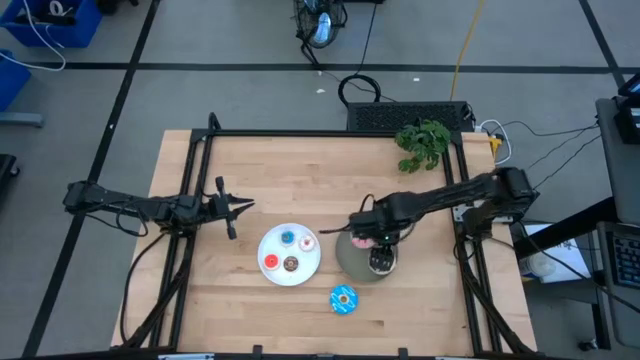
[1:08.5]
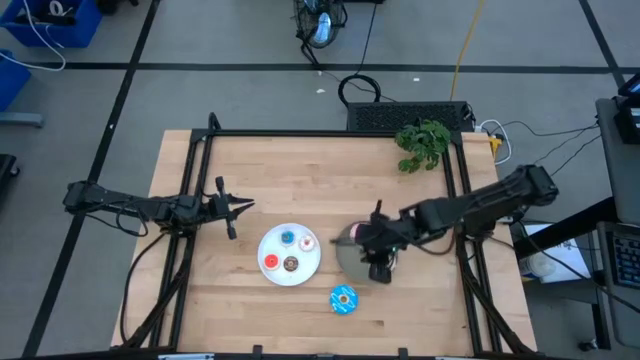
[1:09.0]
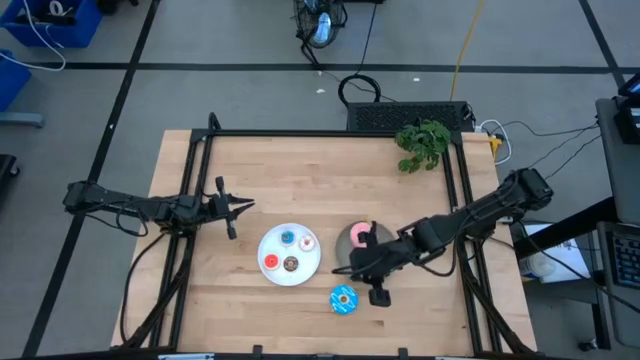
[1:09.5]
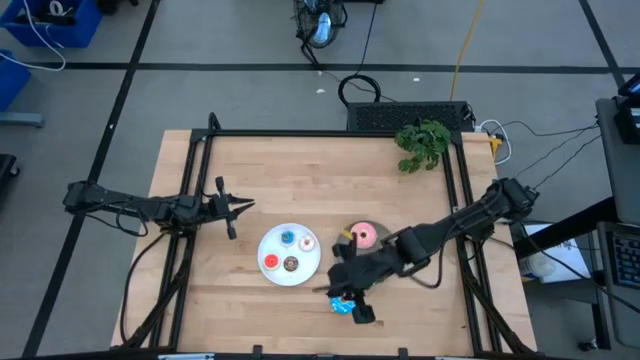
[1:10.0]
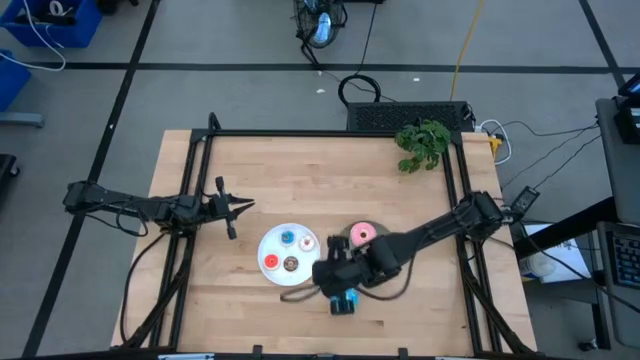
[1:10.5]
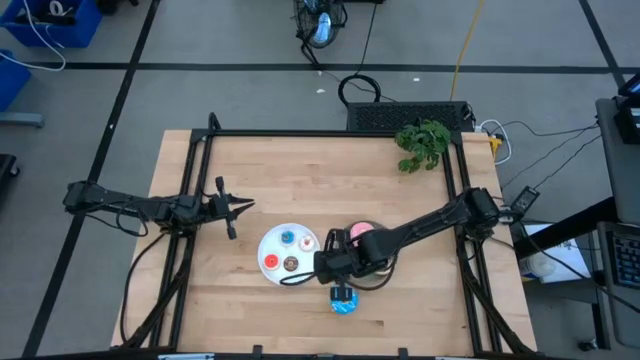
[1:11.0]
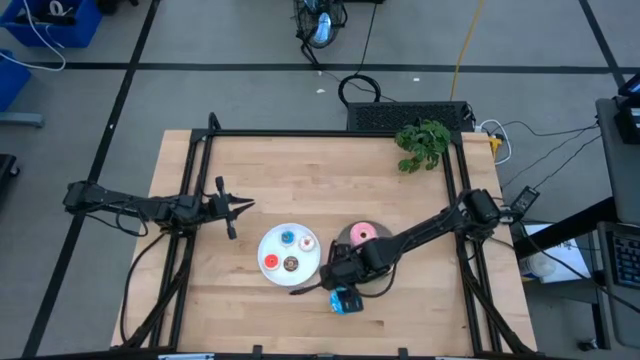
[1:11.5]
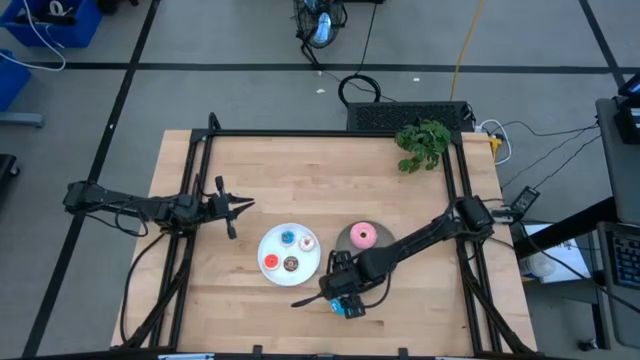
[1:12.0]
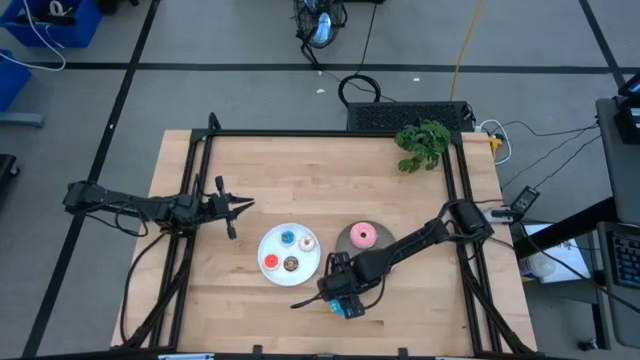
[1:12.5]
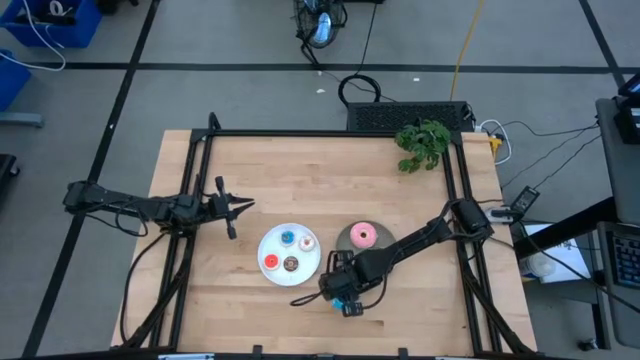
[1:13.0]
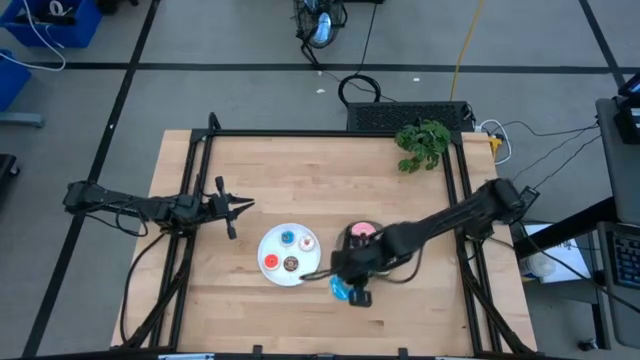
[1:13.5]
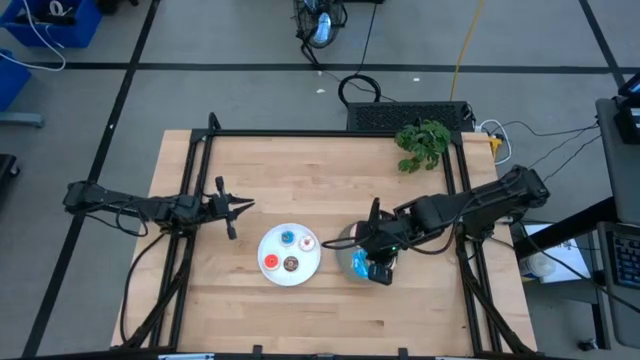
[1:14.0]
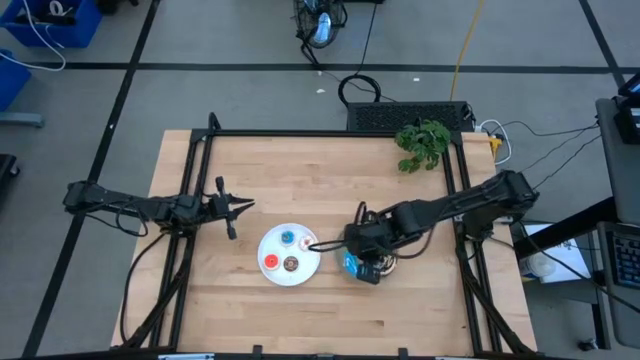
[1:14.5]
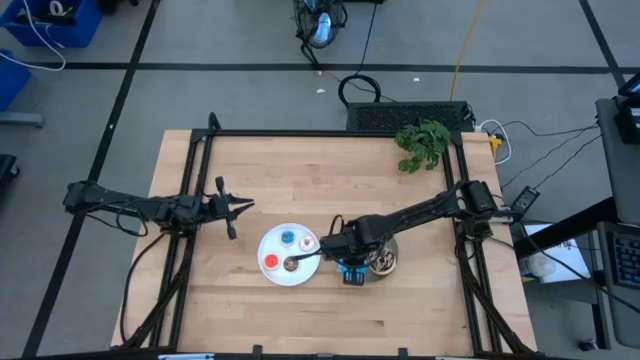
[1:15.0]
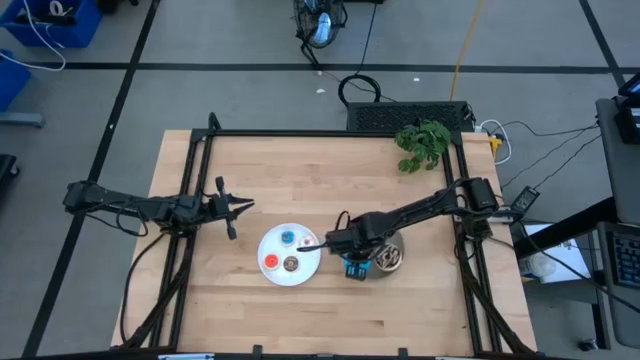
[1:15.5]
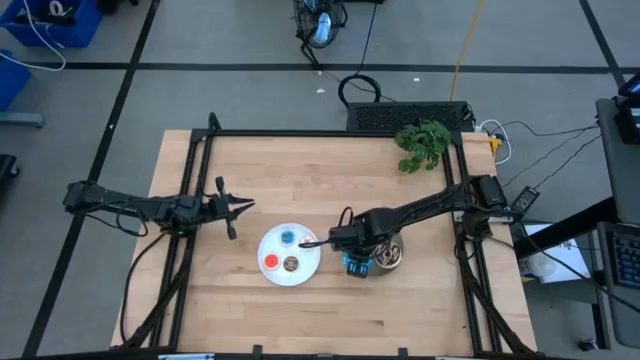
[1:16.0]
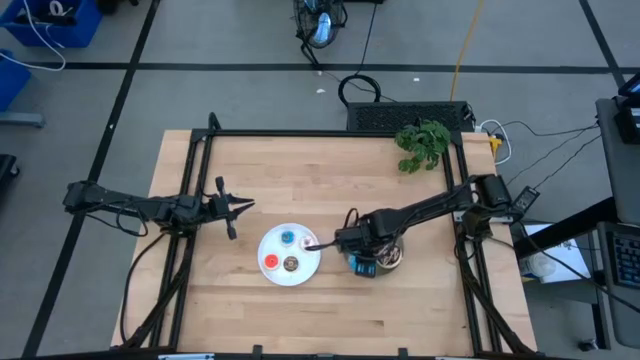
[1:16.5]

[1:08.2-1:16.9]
Task: Pick & Place donuts
Put the large blue donut on the gray plate

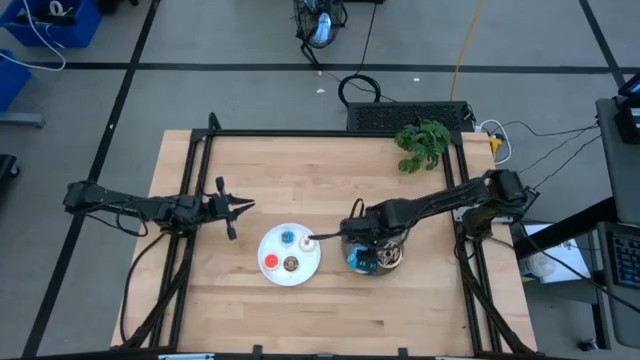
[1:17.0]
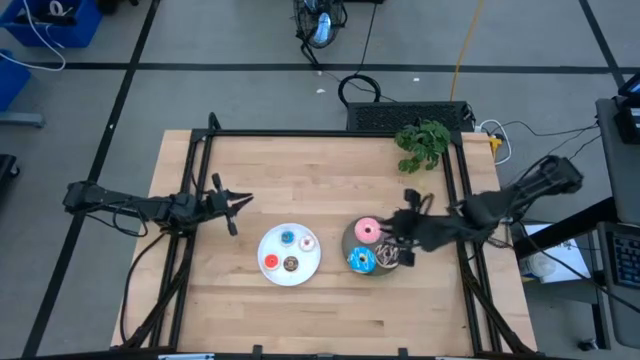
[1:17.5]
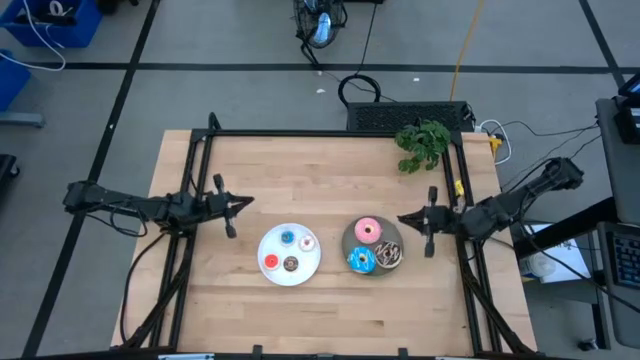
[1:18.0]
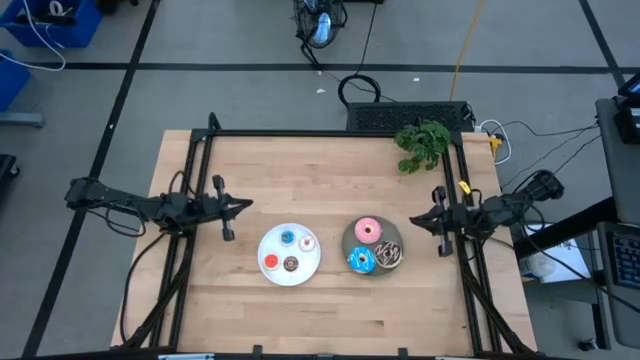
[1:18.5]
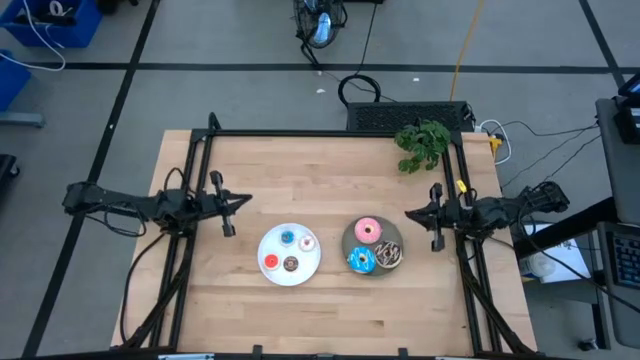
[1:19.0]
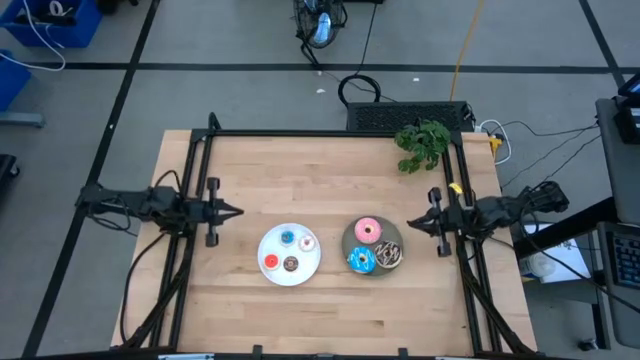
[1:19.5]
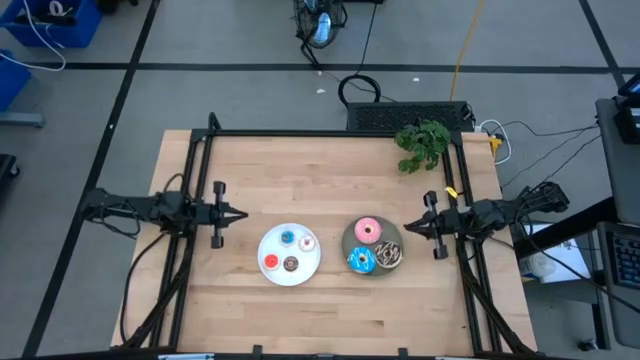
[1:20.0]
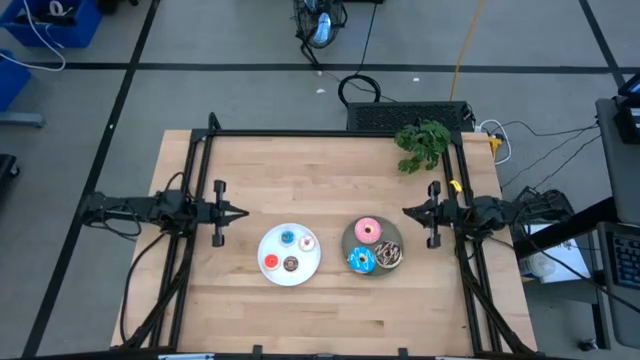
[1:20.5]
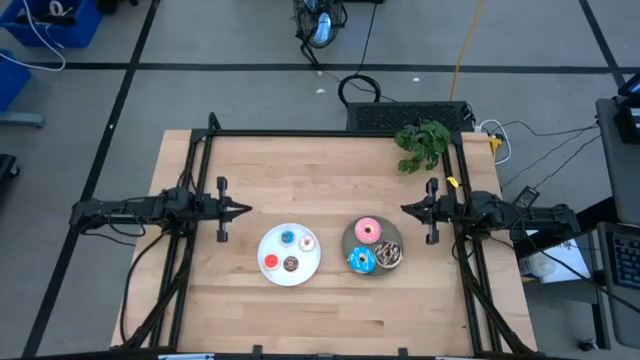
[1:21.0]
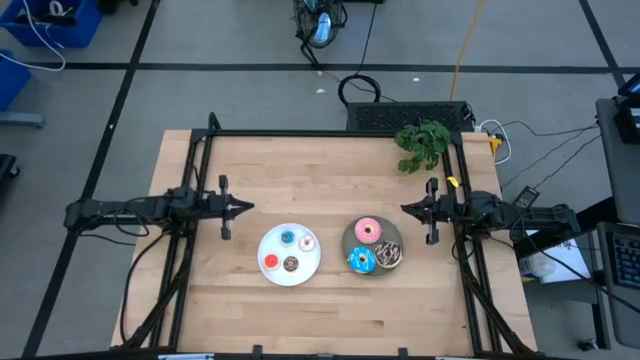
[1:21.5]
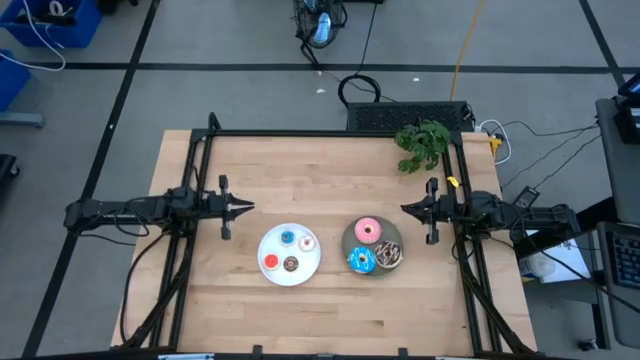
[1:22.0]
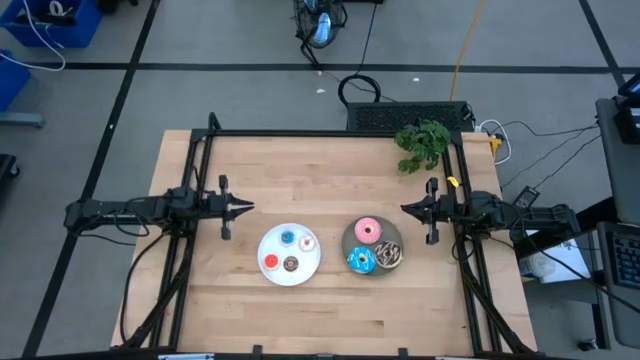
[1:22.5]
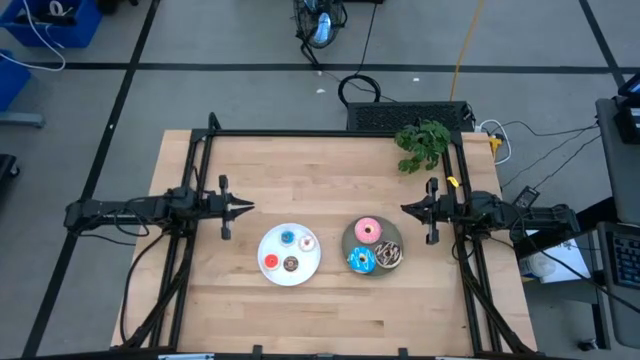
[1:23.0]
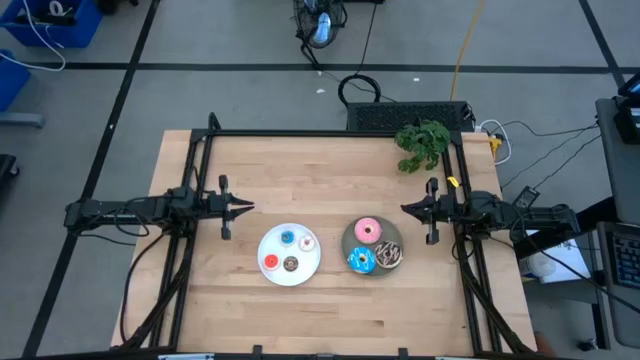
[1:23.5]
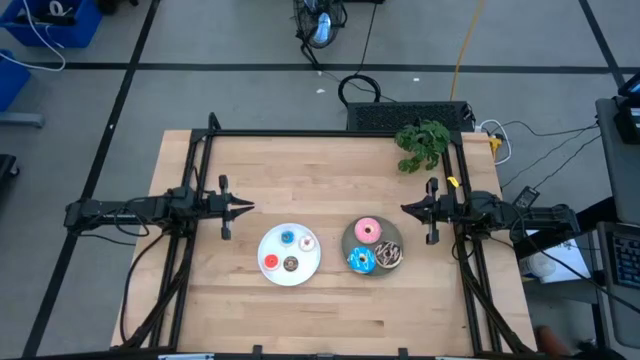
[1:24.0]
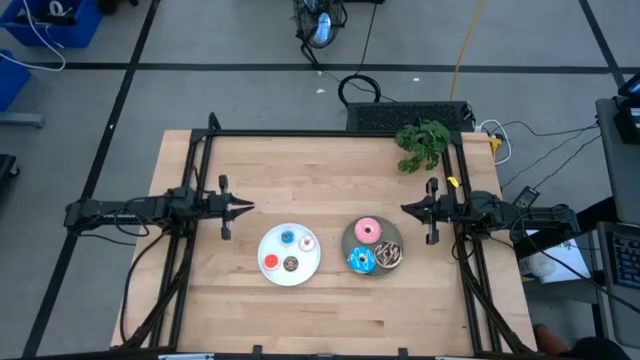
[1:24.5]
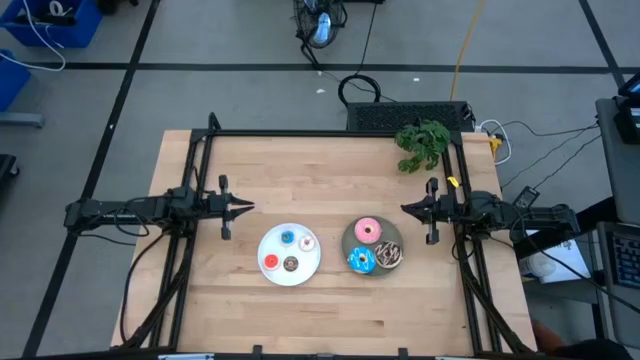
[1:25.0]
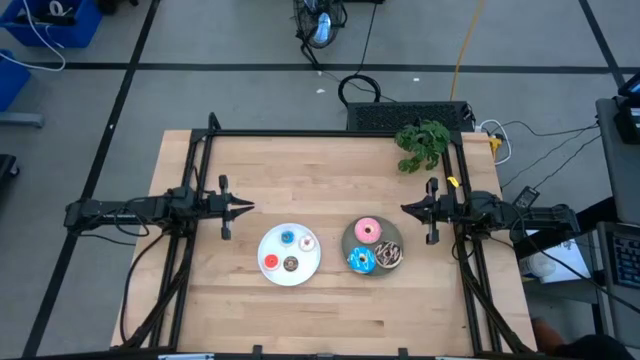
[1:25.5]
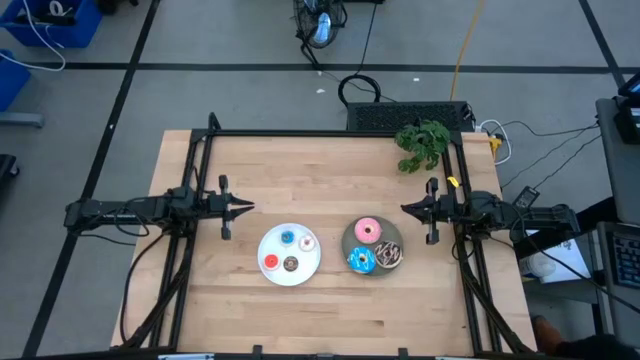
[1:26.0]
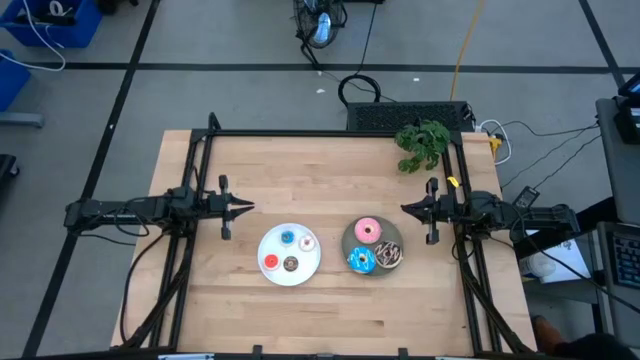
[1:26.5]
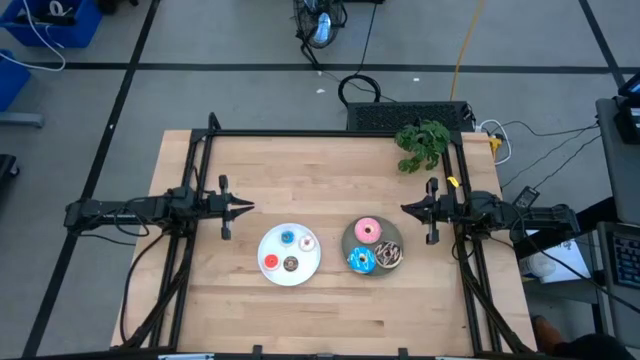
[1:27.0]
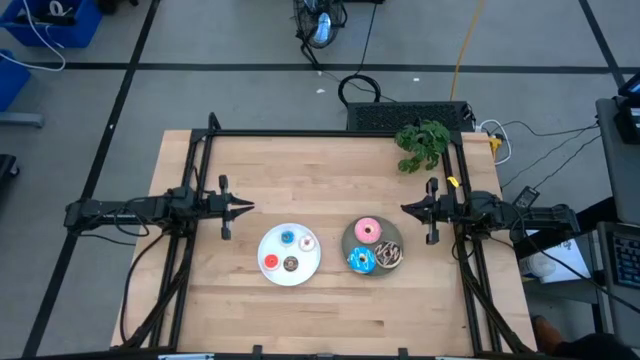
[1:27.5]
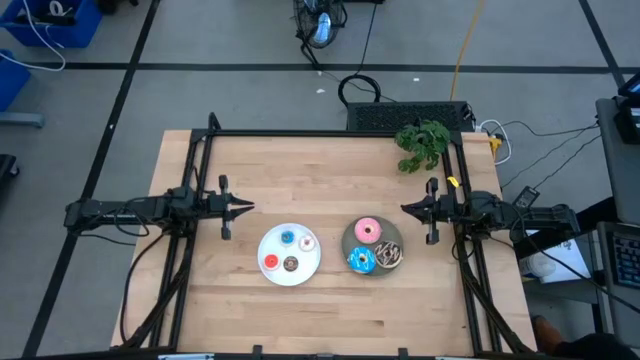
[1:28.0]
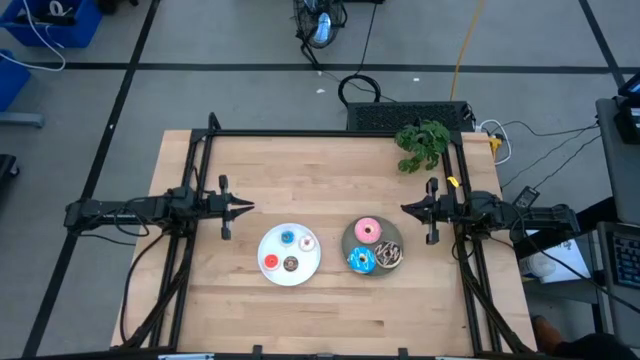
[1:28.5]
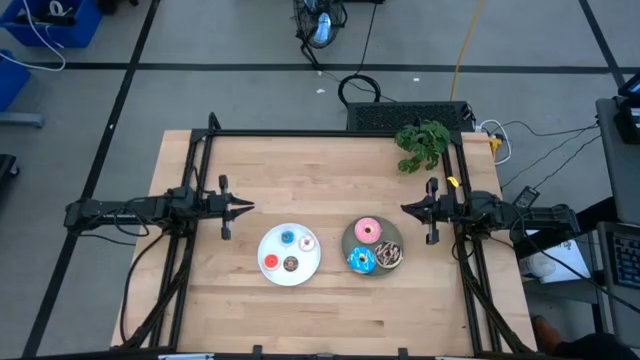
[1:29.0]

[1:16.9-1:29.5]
Return to Home Position

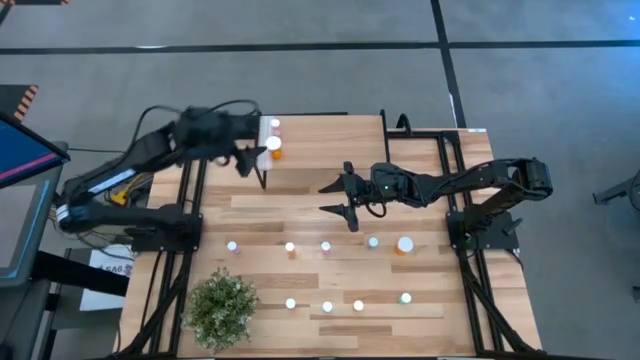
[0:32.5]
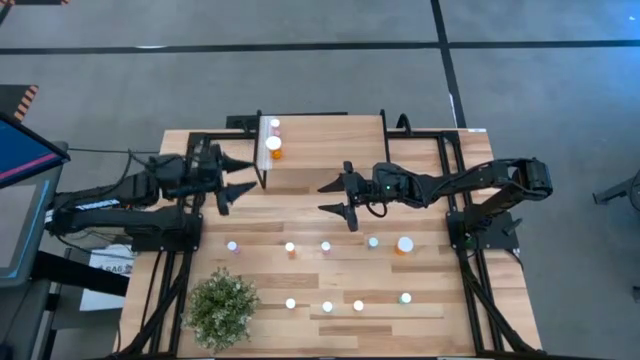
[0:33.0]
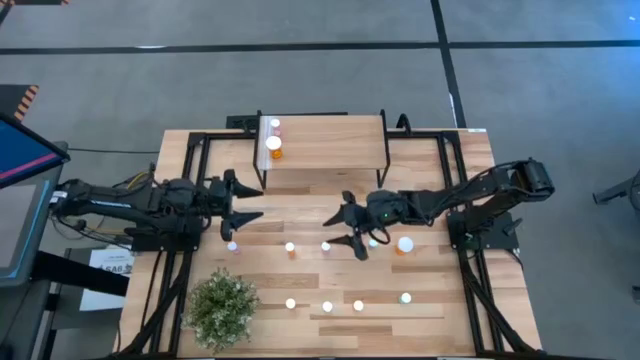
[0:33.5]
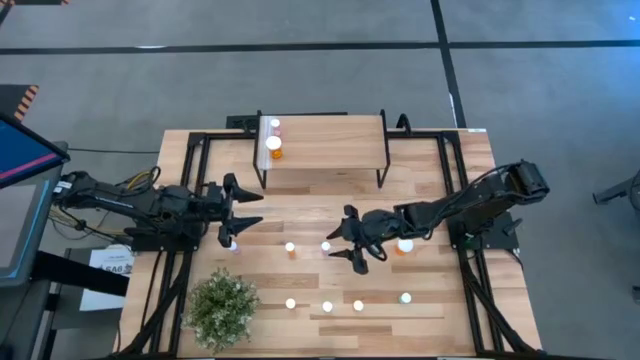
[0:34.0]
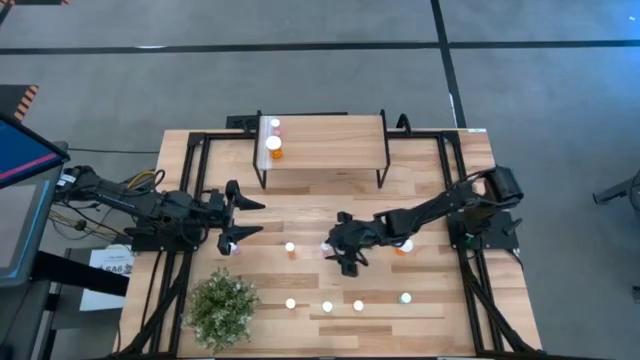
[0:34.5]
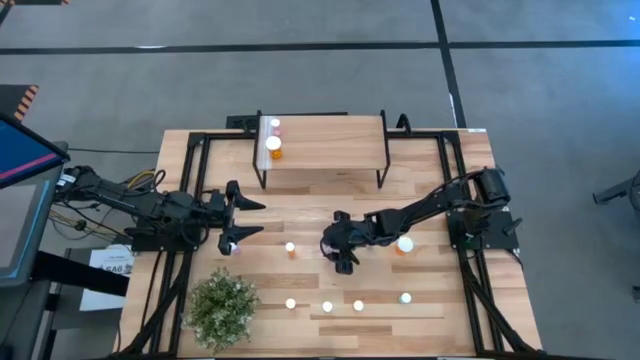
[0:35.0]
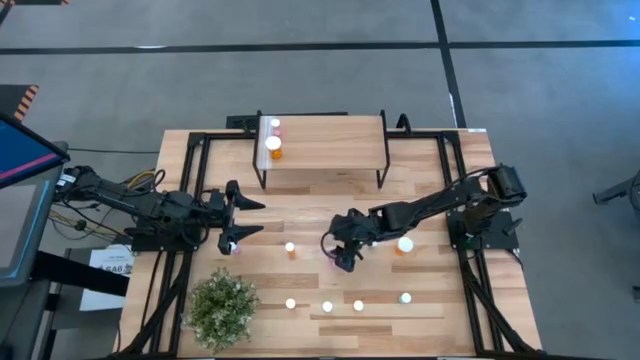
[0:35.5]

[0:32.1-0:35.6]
Task: Pick and place medicine bottles onto shelf by color
Put the small transparent pill bottle on the shelf
